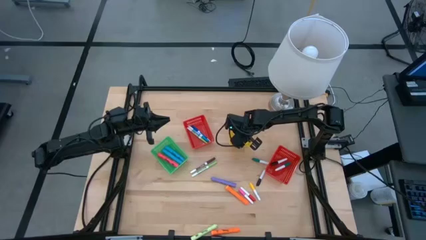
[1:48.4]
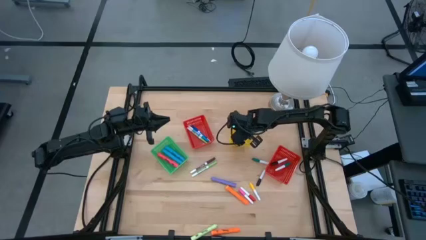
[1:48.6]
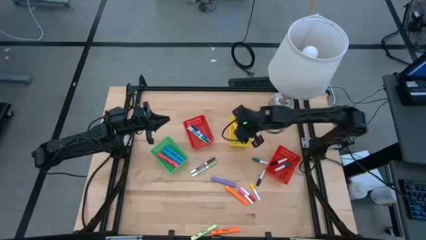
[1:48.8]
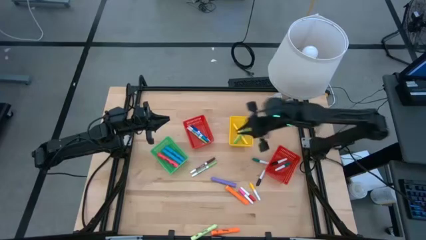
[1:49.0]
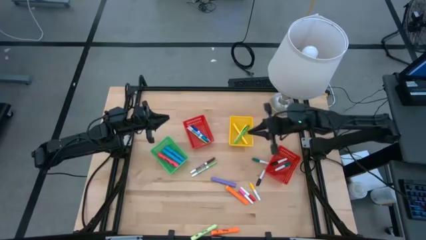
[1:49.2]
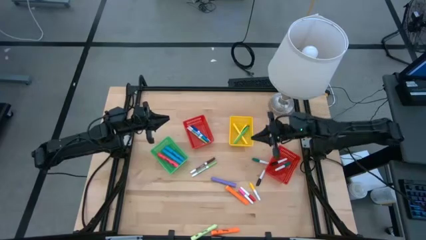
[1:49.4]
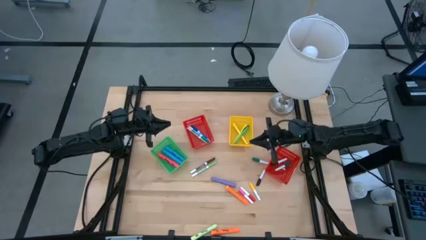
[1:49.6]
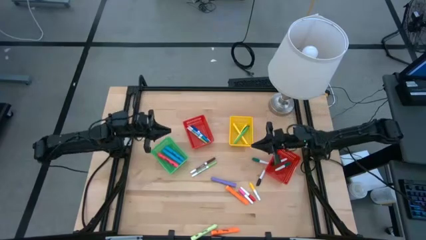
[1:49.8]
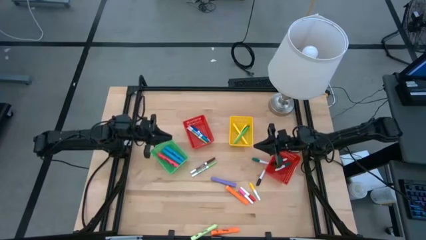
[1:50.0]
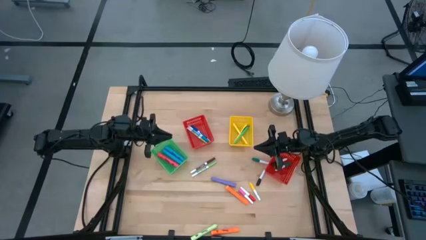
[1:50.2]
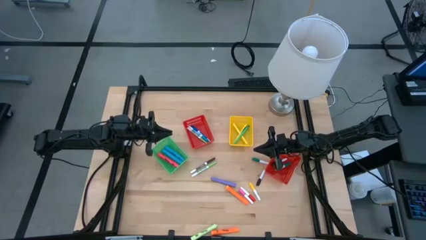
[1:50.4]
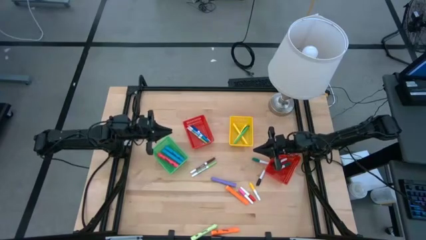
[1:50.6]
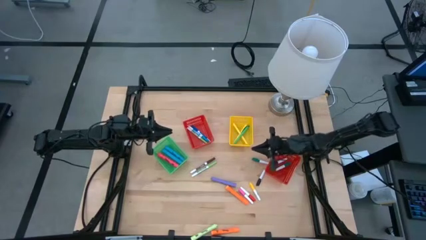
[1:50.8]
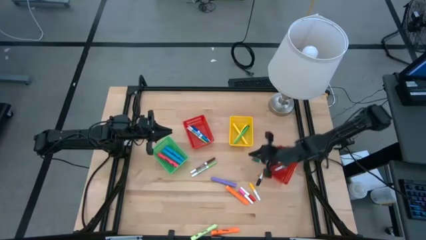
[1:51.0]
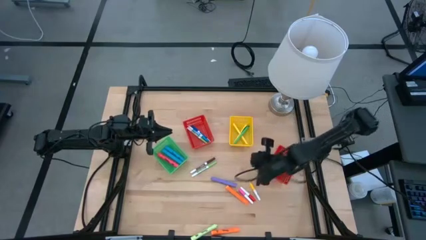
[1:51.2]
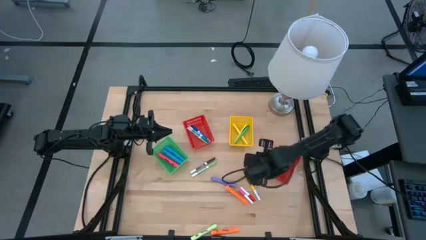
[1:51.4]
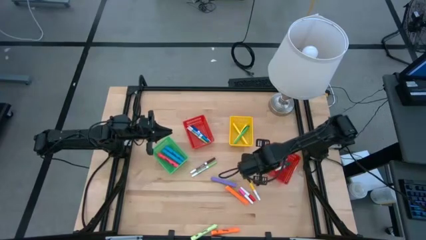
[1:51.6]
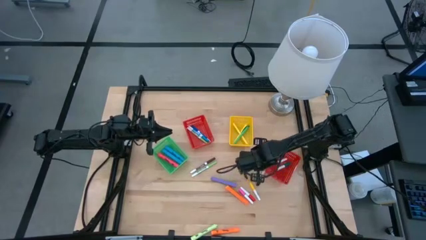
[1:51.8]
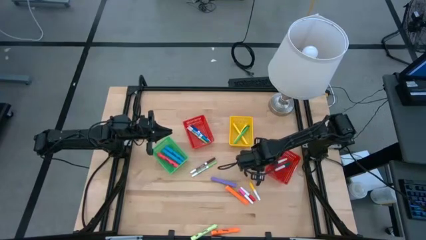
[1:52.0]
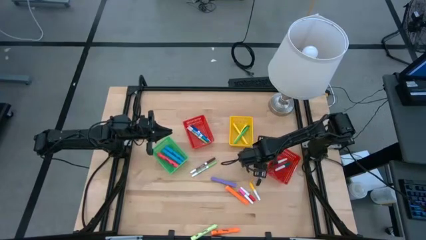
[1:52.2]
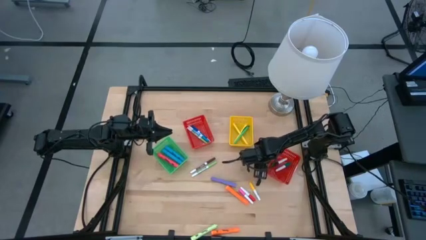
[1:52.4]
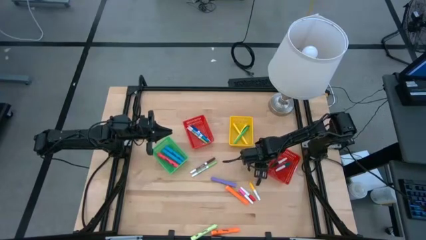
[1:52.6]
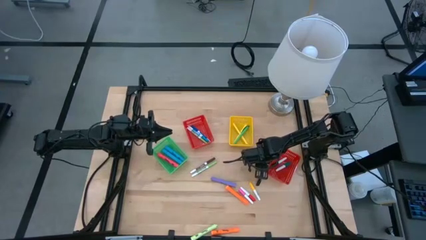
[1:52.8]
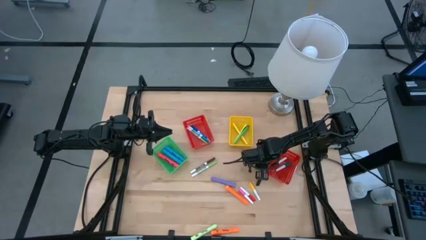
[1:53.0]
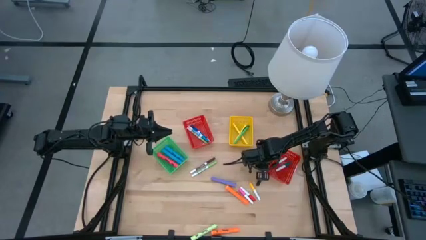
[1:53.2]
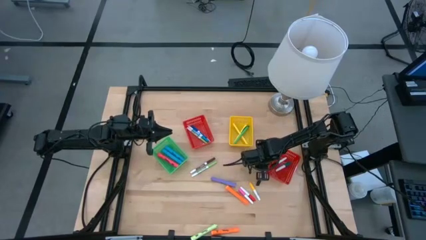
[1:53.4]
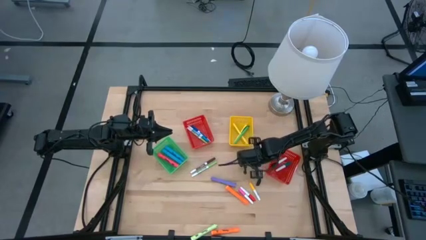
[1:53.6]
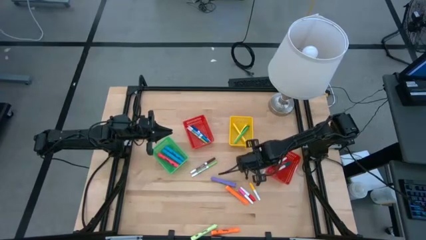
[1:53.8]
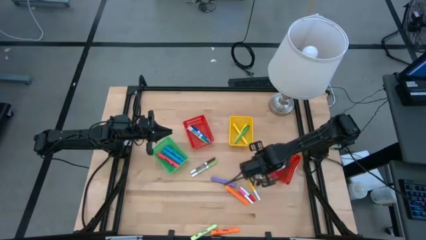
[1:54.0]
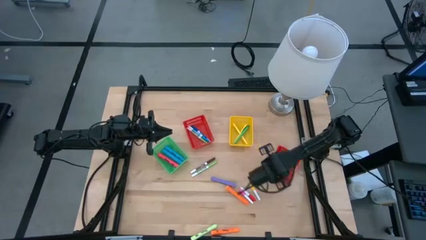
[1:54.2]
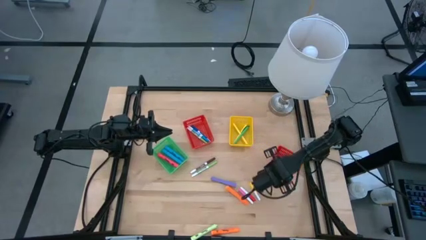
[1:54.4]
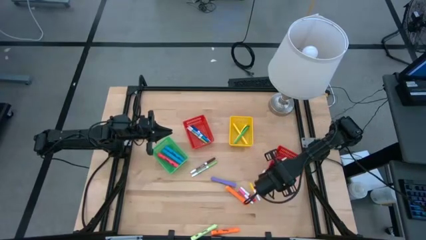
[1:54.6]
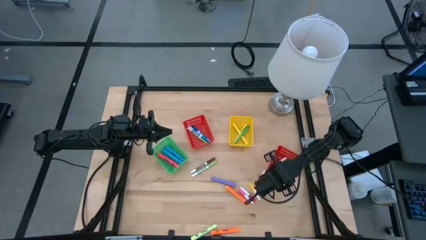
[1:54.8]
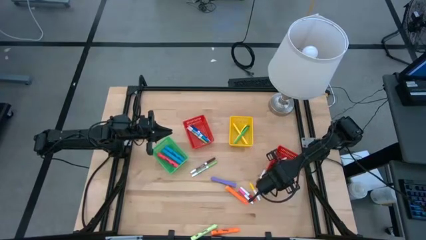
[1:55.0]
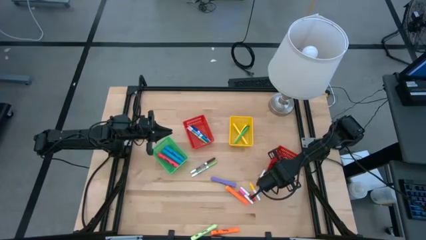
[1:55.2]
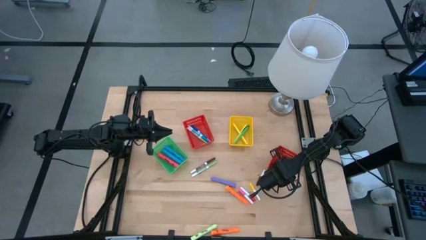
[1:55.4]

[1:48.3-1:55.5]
Task: Pick & Place Markers
Put the small green highlighter pen into the right red bin

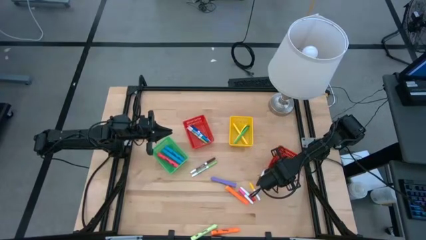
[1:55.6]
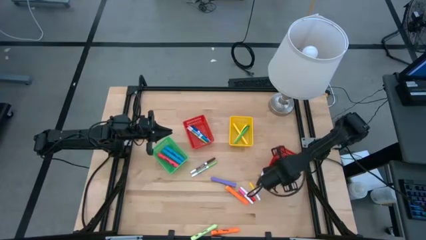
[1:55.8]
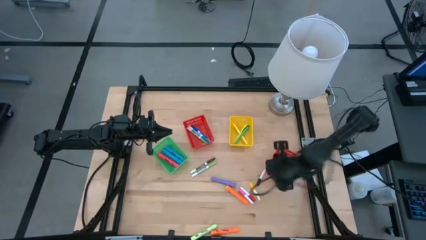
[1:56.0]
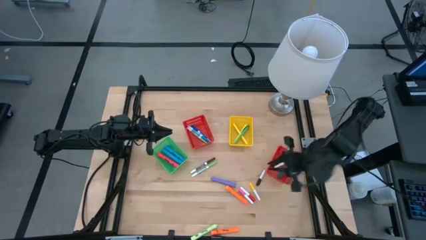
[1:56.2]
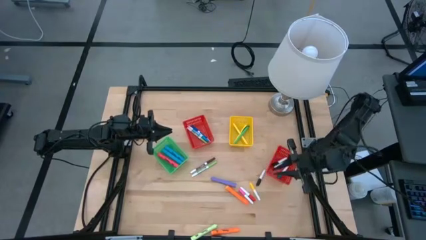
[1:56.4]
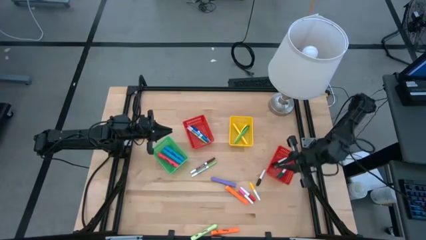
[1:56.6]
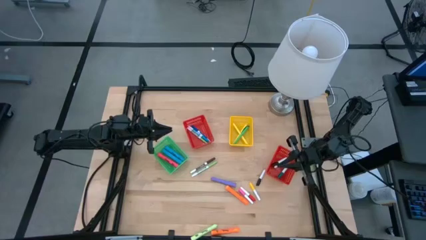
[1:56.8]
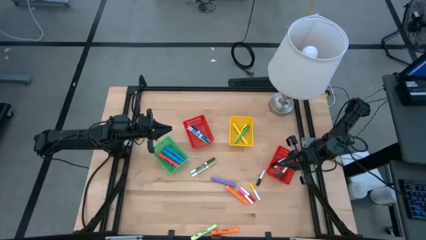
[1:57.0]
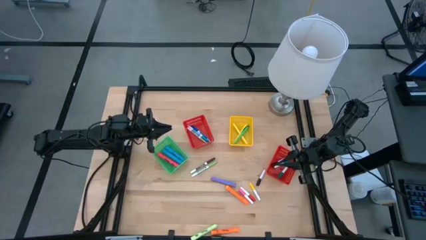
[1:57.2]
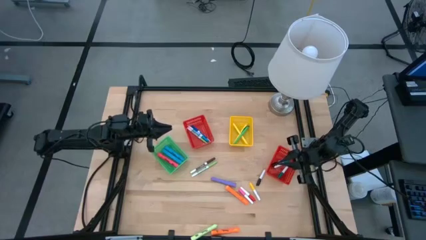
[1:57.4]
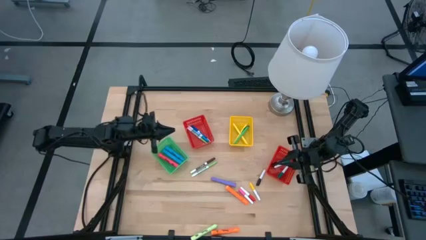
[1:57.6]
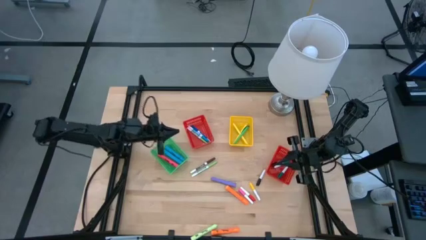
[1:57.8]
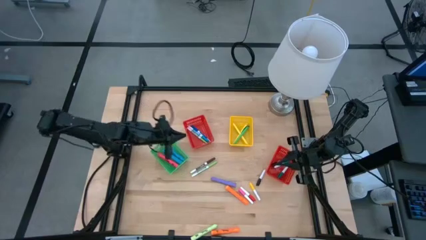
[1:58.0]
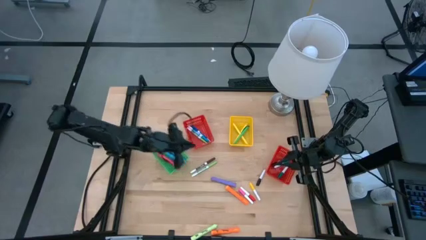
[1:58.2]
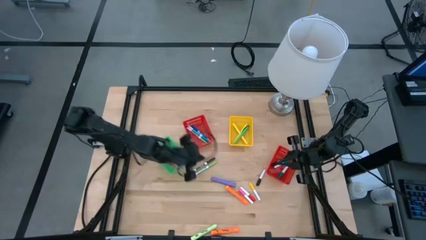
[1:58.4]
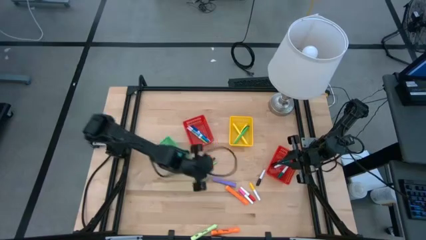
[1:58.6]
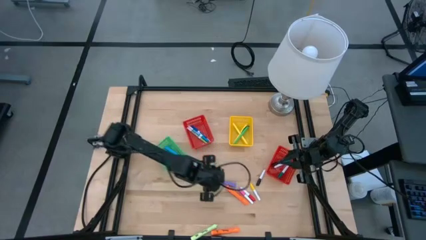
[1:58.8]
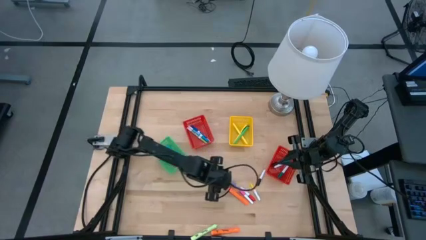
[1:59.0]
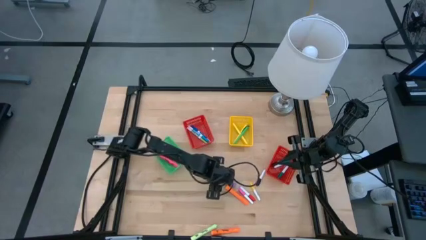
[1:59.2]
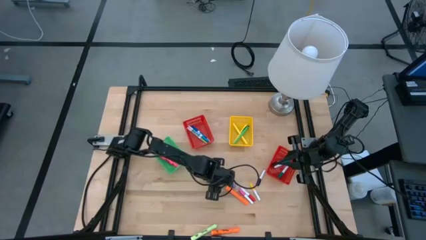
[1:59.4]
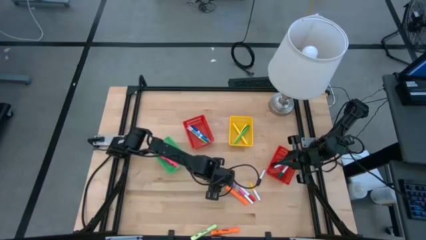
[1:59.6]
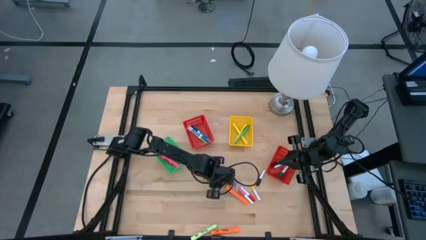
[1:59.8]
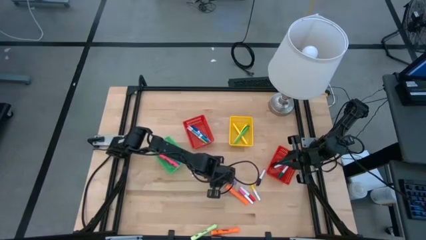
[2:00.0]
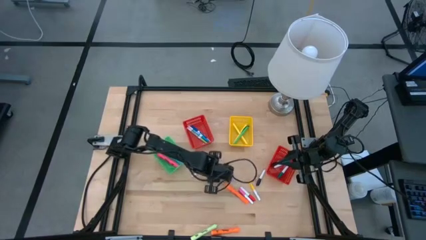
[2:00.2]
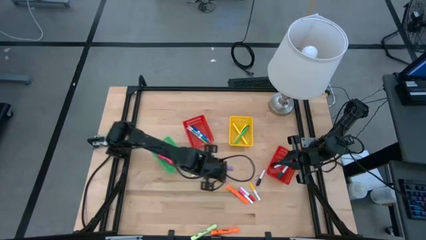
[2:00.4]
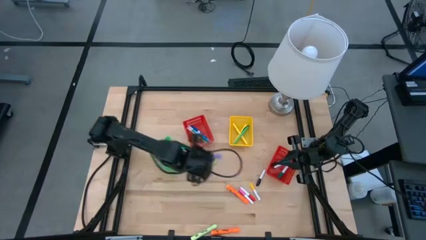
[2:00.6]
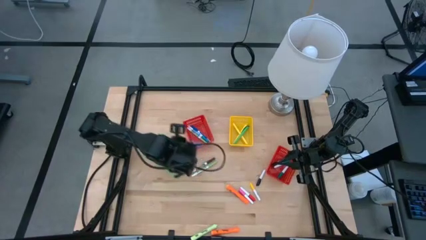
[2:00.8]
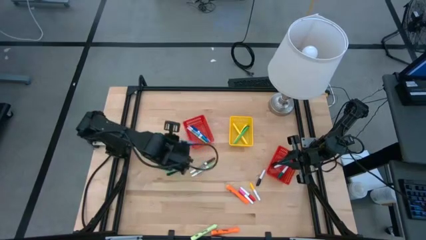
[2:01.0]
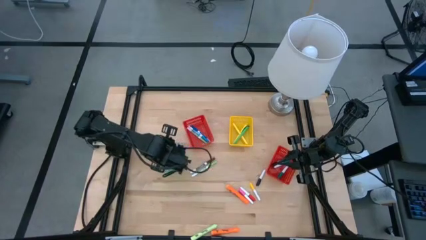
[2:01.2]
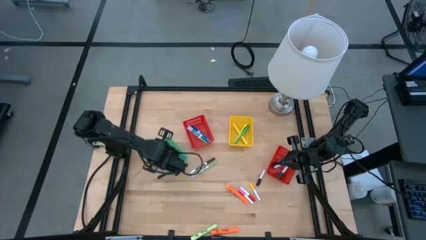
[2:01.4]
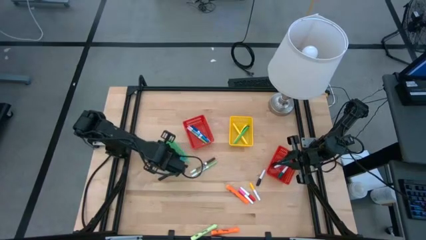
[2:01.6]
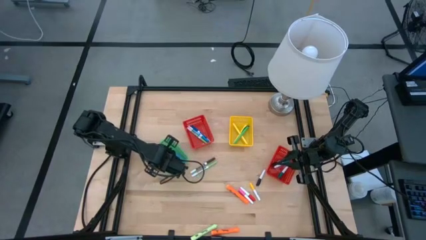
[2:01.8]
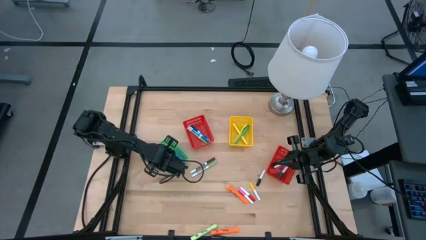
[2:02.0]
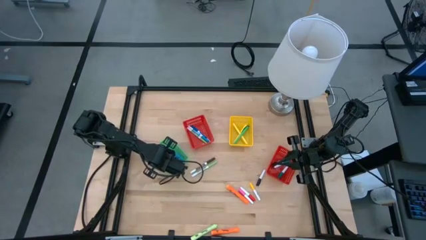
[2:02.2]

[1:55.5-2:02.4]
Put the large purple highlighter pen into the green bin
